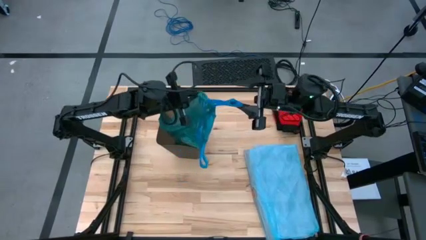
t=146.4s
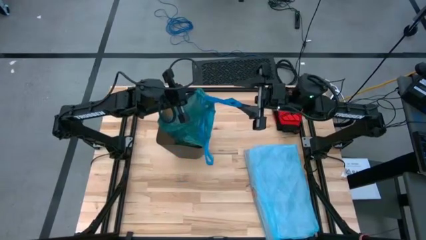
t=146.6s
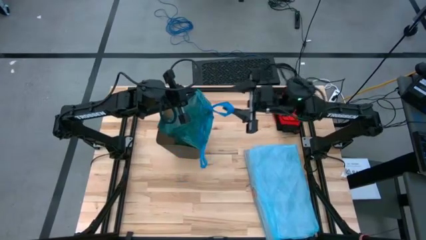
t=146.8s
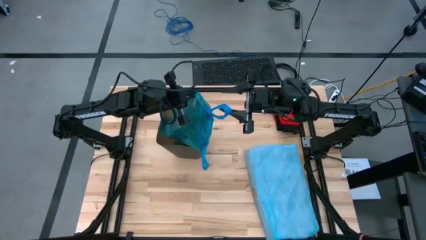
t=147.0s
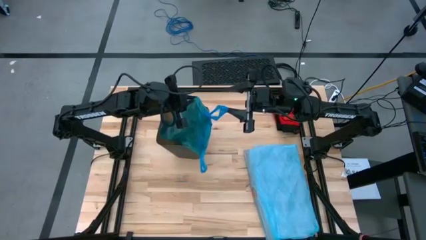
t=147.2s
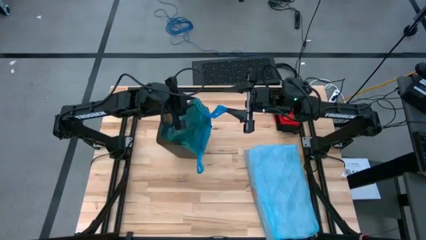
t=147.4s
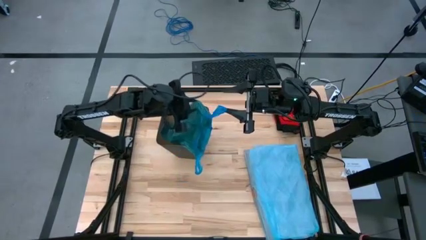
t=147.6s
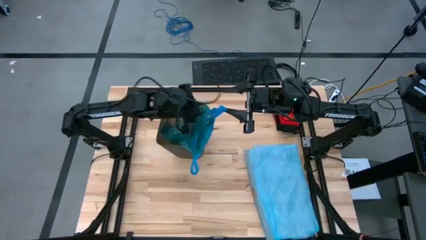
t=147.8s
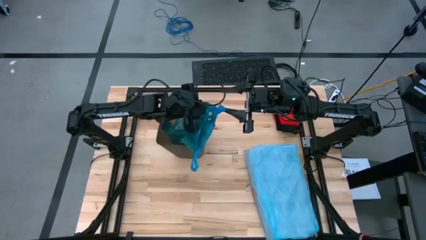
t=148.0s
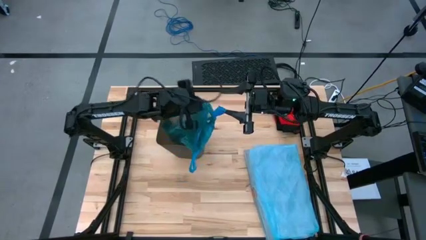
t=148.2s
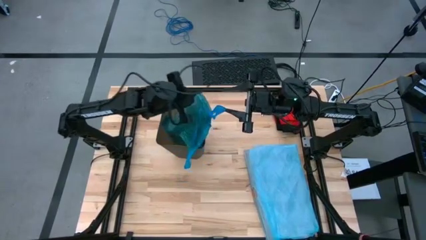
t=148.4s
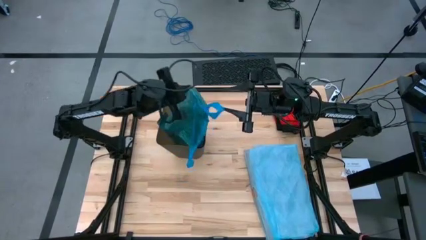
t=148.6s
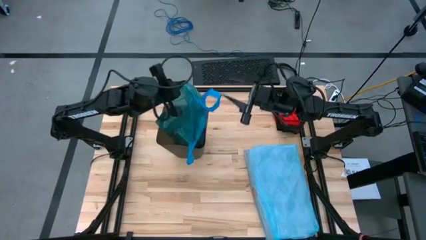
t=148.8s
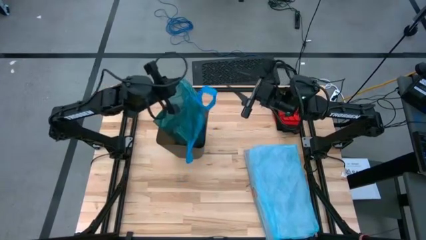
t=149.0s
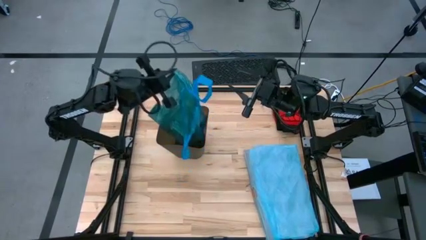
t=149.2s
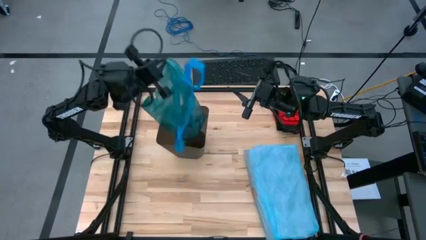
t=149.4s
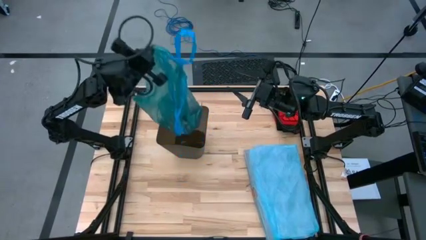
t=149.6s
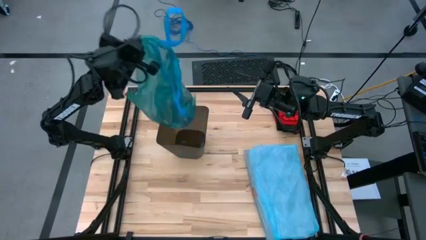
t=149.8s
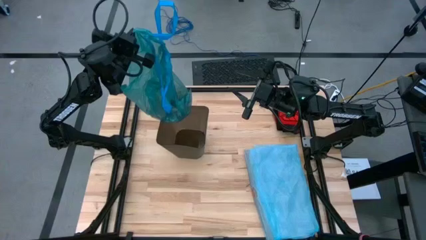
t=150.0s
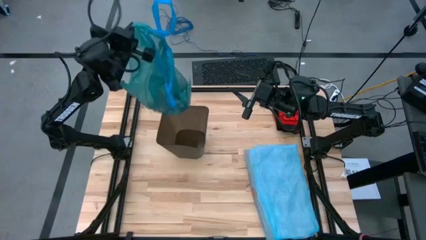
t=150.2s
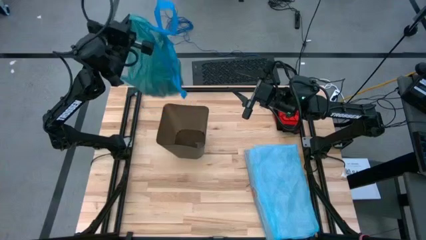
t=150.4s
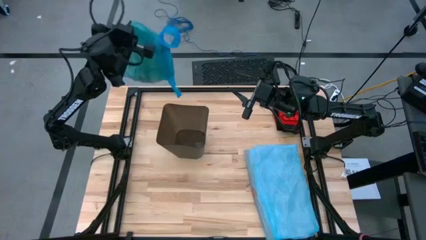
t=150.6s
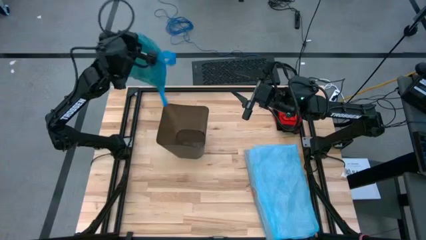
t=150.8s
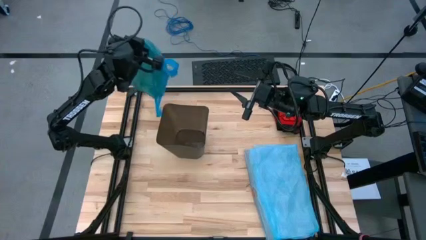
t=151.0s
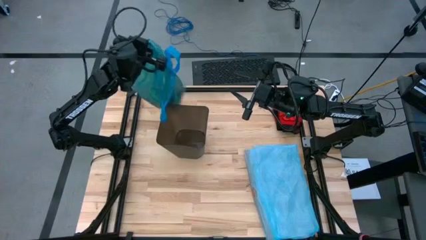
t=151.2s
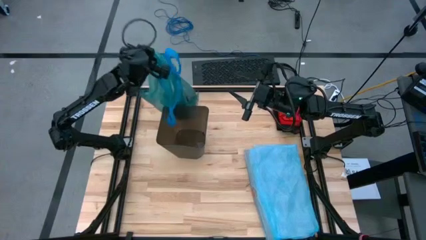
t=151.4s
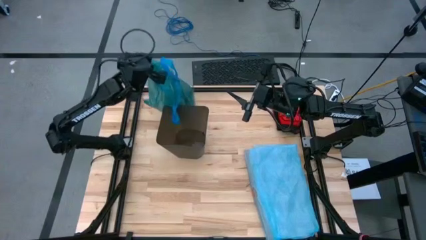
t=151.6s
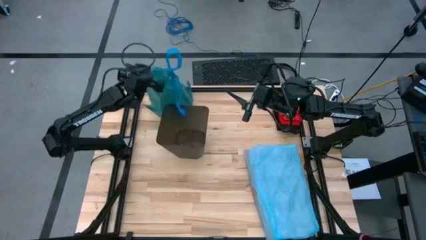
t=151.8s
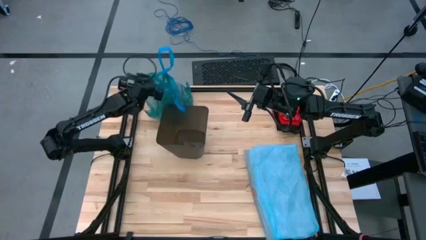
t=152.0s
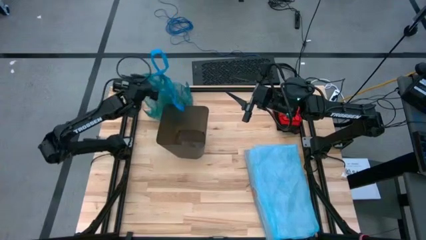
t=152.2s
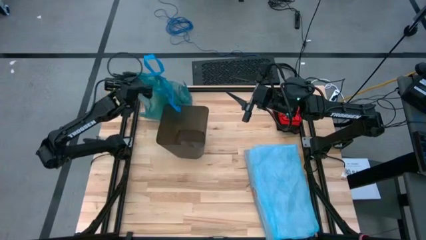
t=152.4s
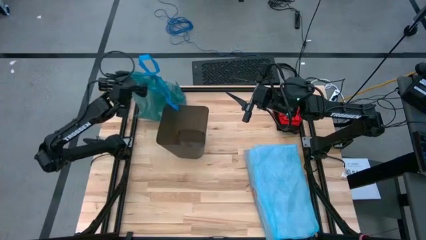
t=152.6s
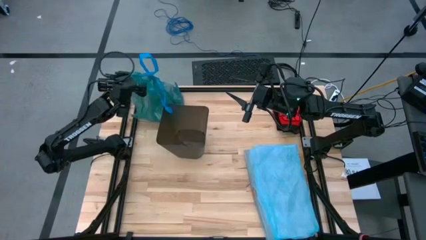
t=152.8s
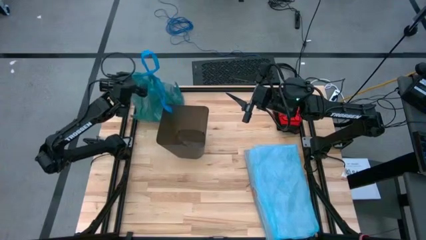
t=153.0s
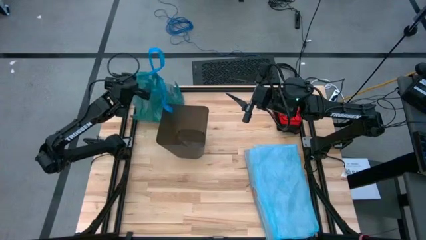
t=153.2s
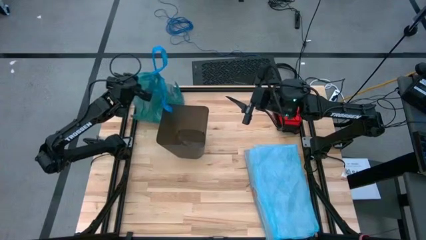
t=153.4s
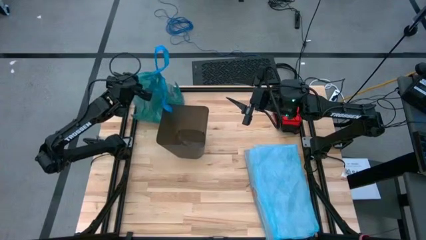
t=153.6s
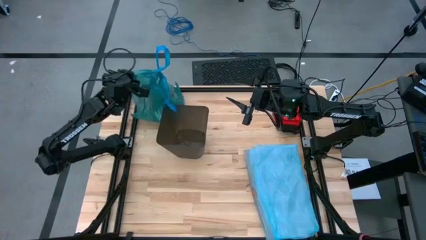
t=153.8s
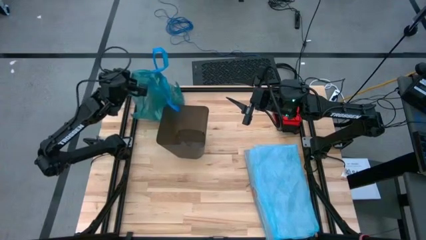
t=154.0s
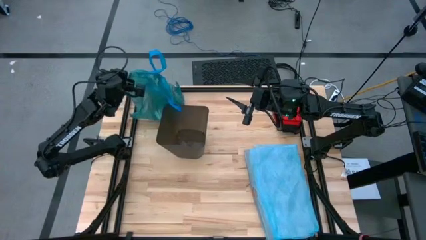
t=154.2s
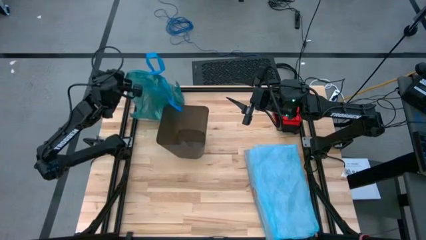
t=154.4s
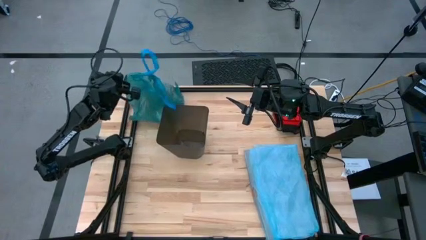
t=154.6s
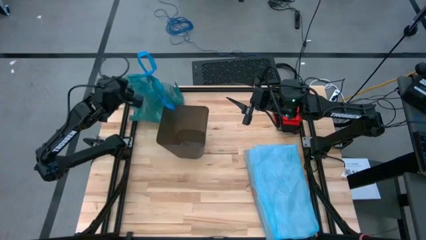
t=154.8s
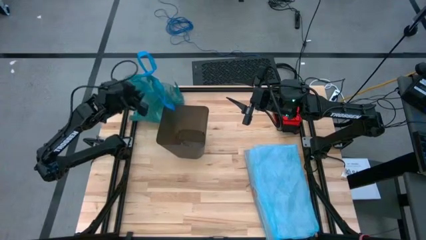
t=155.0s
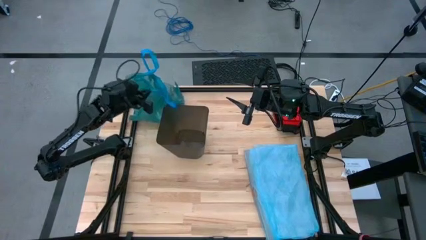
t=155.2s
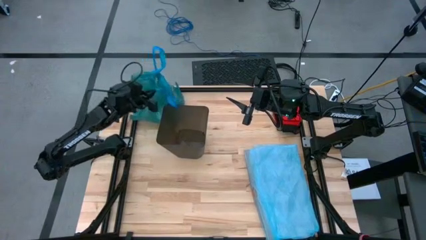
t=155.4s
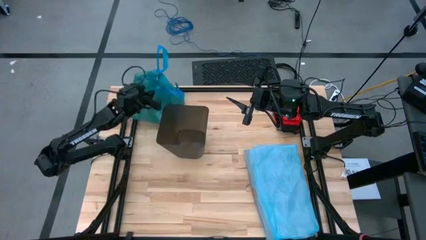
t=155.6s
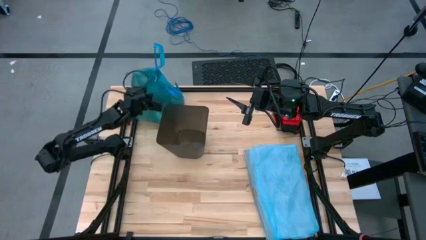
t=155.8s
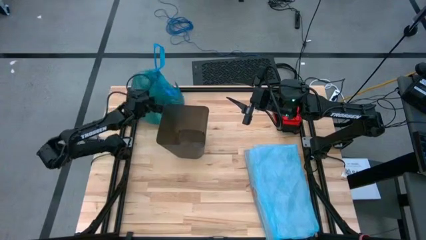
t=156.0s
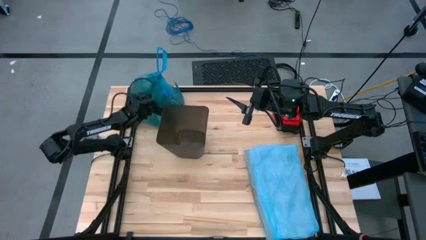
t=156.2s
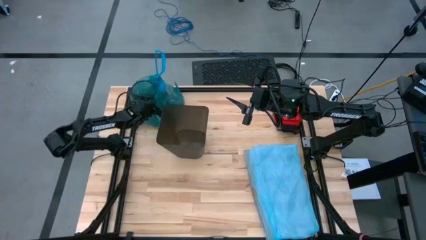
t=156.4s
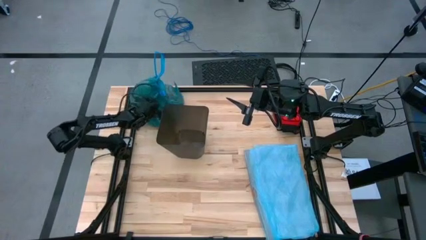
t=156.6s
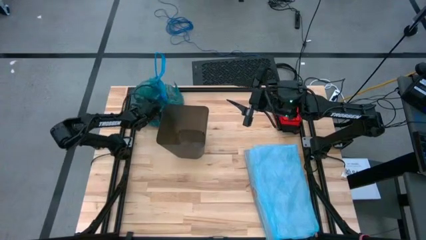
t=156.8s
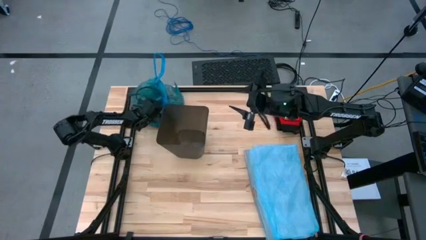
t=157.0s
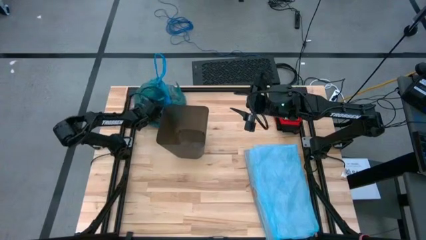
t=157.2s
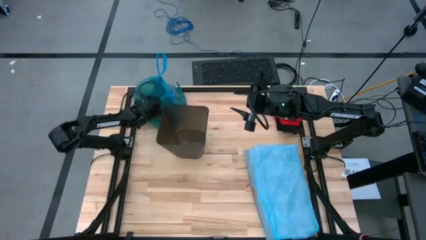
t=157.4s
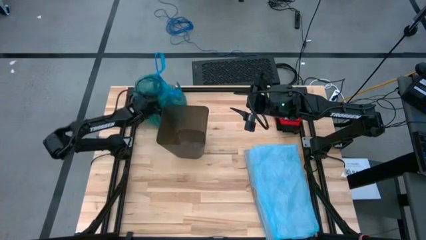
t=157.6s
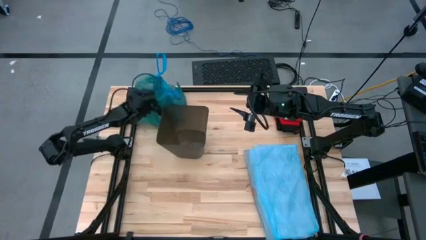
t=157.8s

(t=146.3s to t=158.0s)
Task: place trash/remove bag and relplace
Remove the trash bag from the bin

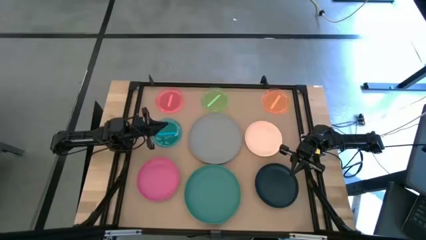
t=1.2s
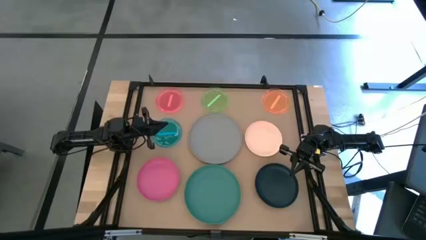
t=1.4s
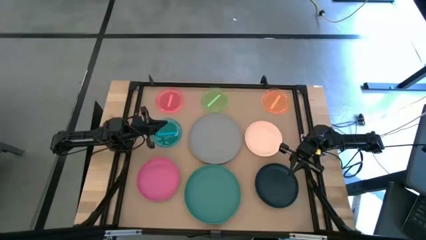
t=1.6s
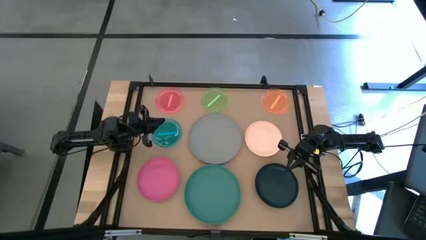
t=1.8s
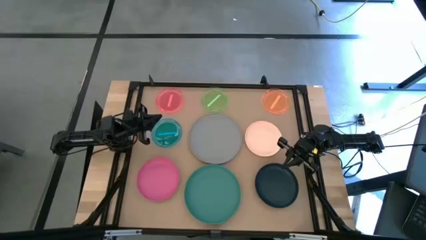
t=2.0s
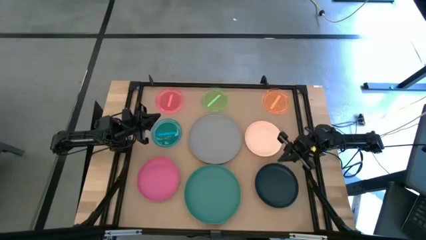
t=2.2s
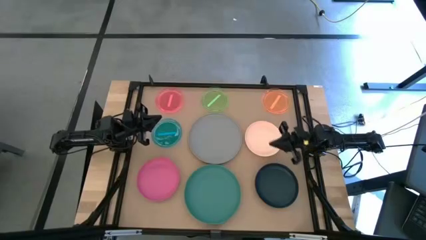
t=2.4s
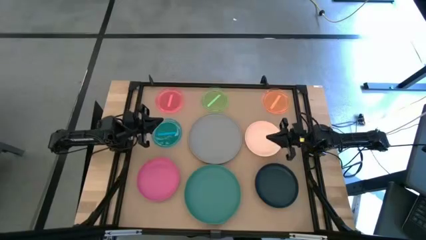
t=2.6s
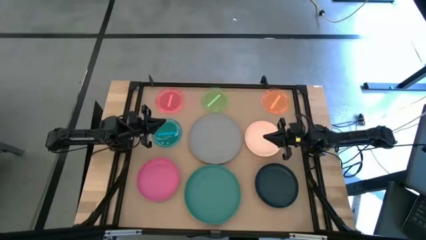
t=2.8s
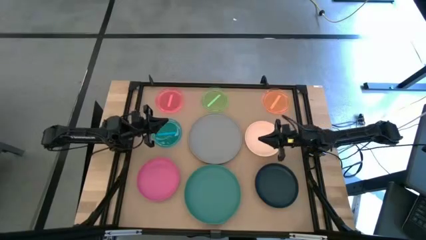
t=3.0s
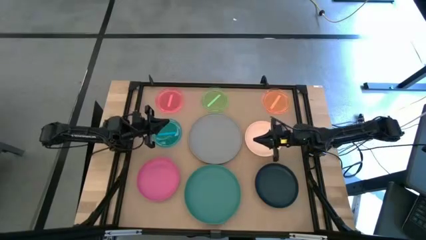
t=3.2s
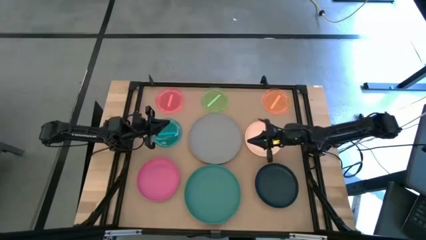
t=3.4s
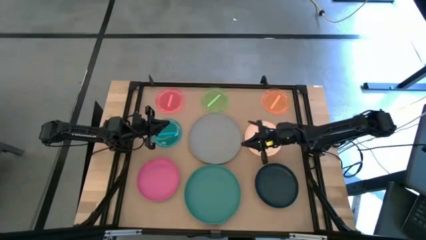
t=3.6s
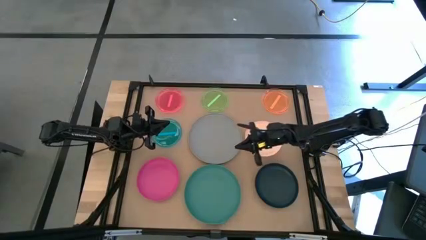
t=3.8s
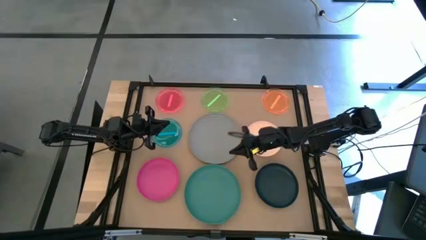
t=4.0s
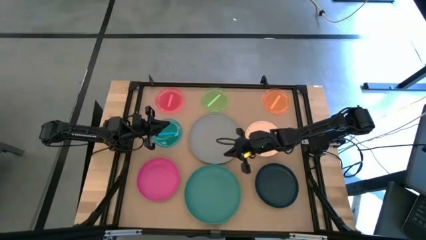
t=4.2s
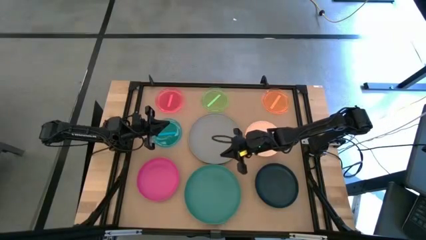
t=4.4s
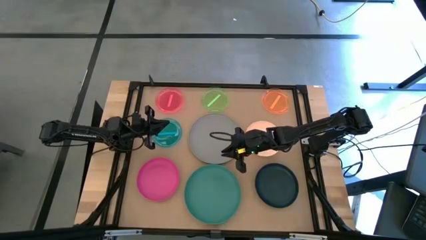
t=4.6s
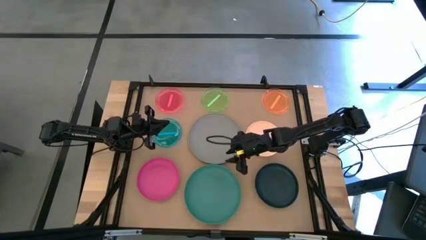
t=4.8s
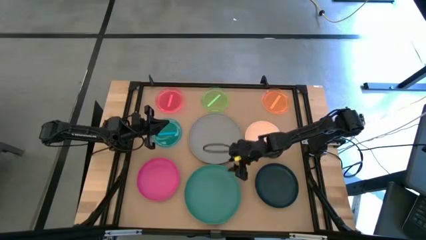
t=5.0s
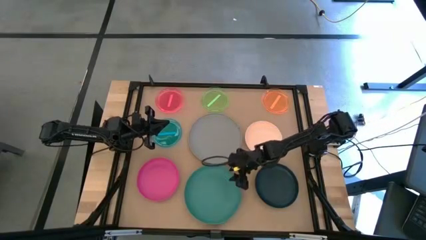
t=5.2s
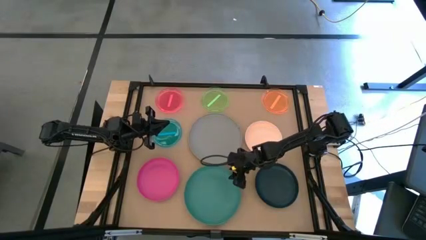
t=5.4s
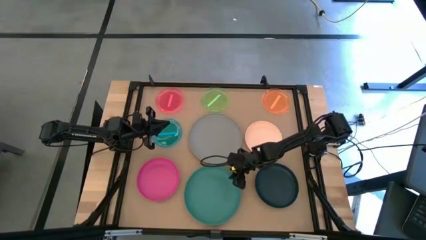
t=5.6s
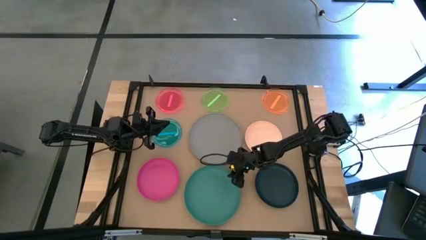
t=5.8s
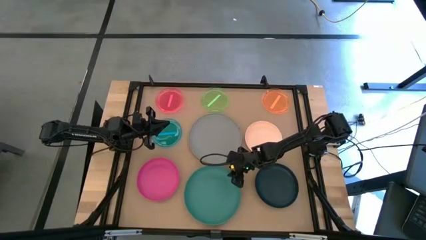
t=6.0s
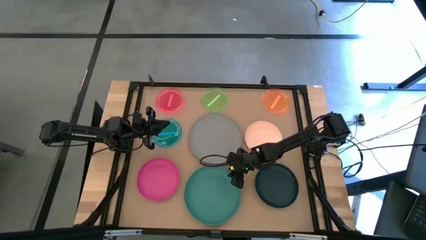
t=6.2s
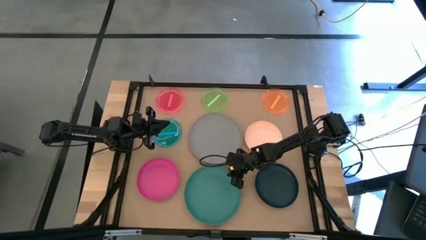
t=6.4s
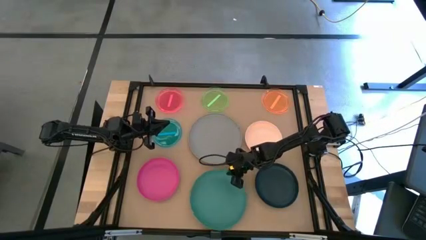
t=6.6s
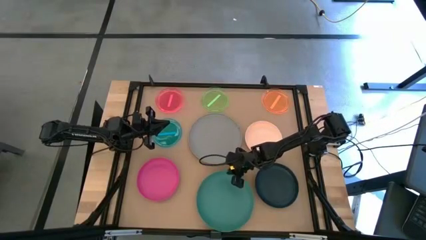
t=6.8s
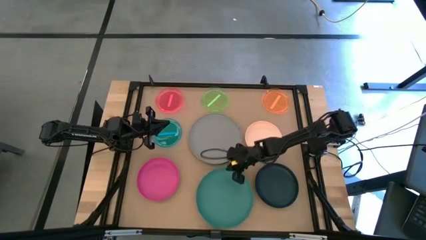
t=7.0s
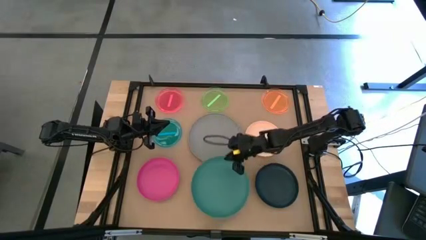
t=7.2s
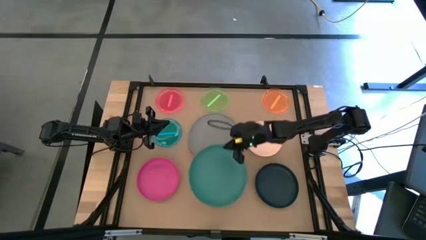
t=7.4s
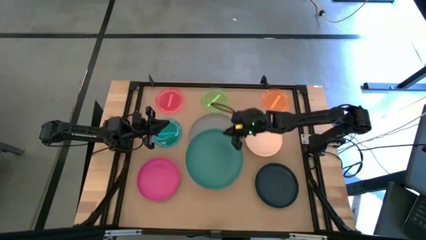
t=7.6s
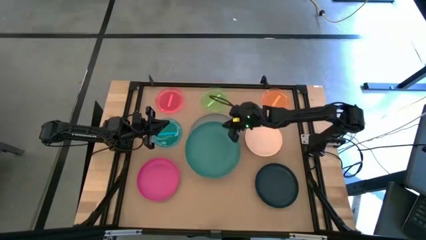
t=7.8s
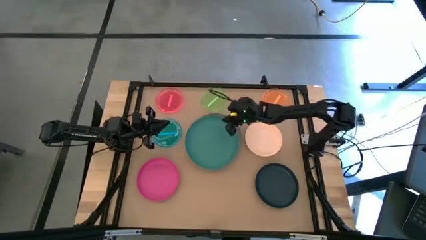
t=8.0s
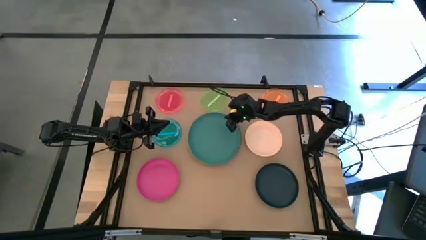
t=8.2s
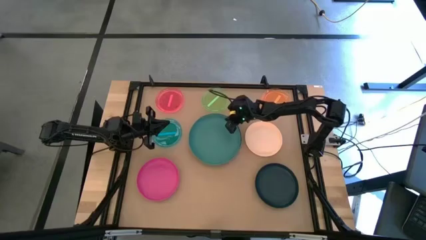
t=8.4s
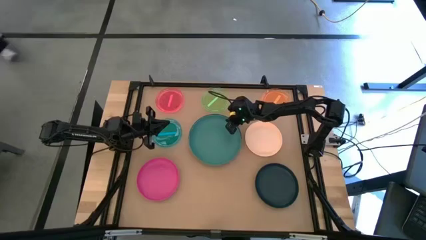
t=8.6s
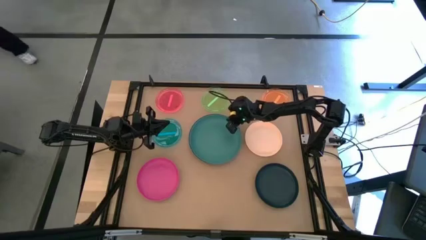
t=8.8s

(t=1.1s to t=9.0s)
Task: Stack plastic plates
Stack the green plate on top of the grey plate
